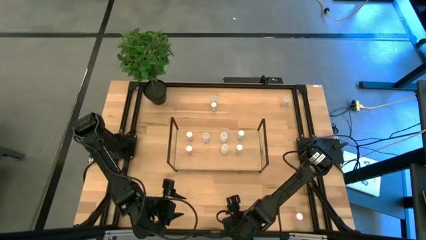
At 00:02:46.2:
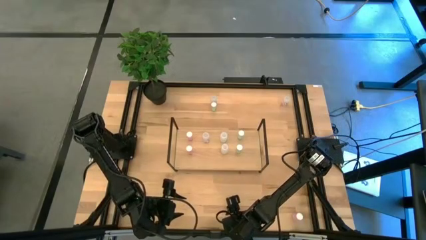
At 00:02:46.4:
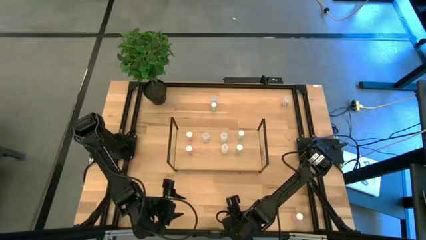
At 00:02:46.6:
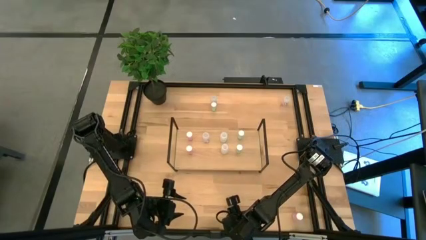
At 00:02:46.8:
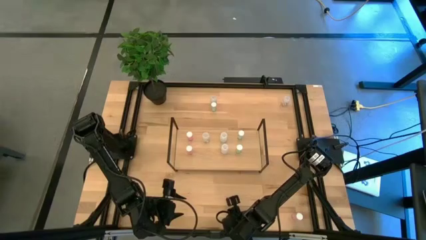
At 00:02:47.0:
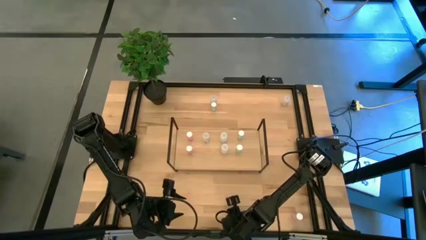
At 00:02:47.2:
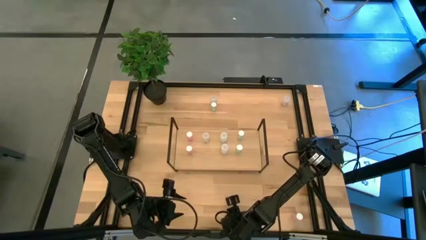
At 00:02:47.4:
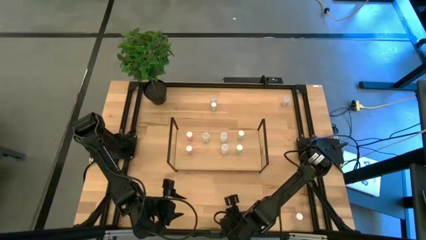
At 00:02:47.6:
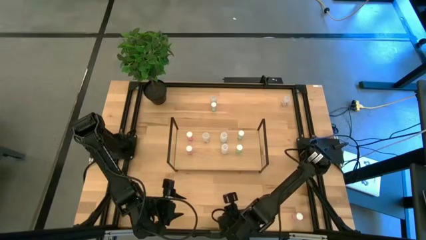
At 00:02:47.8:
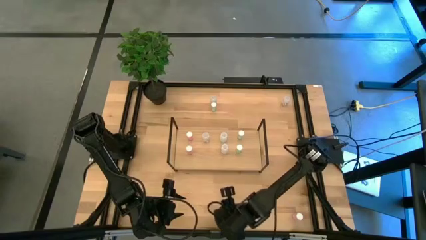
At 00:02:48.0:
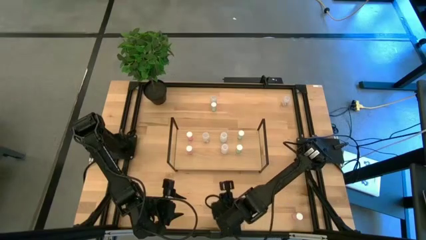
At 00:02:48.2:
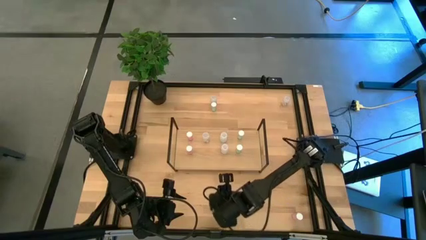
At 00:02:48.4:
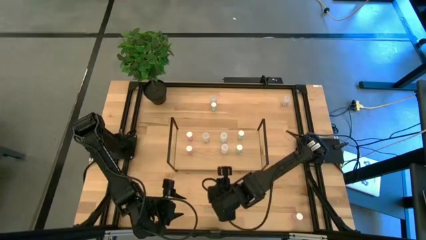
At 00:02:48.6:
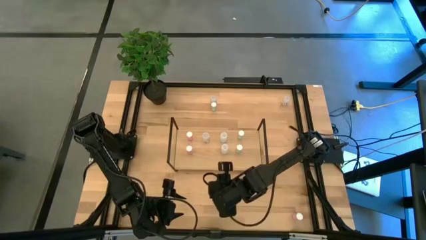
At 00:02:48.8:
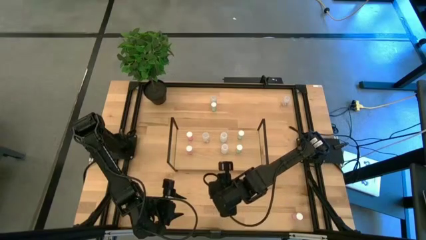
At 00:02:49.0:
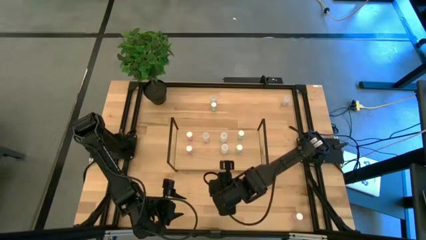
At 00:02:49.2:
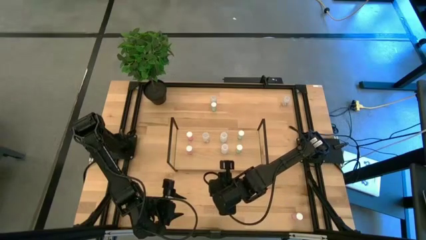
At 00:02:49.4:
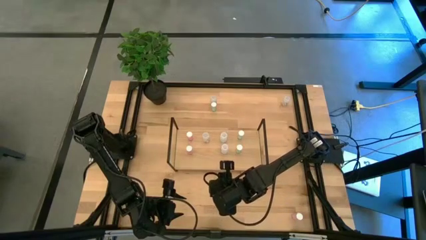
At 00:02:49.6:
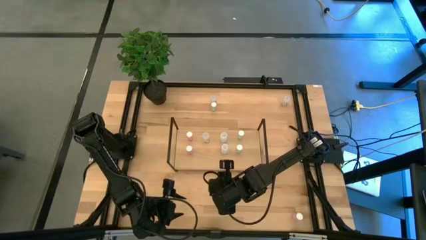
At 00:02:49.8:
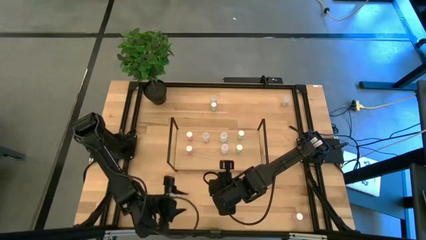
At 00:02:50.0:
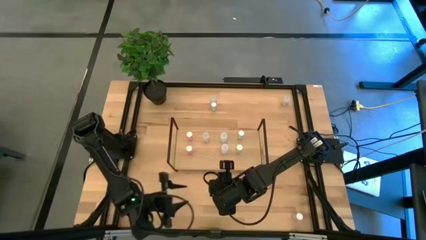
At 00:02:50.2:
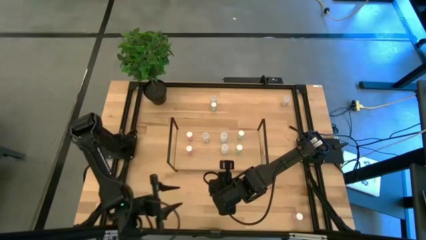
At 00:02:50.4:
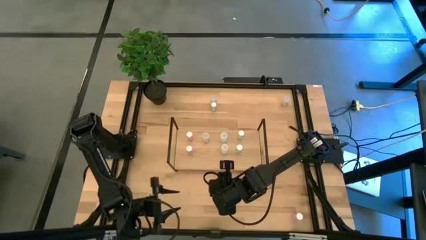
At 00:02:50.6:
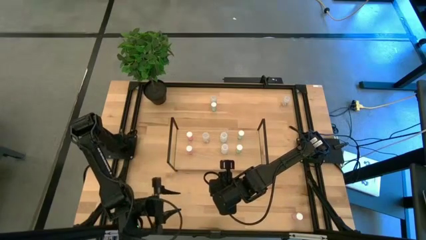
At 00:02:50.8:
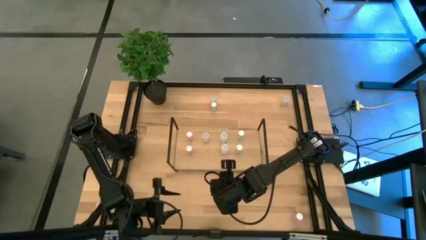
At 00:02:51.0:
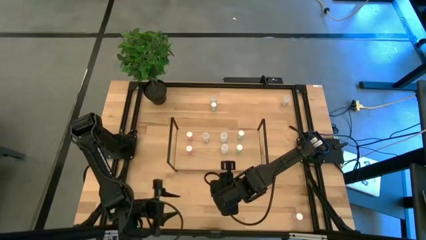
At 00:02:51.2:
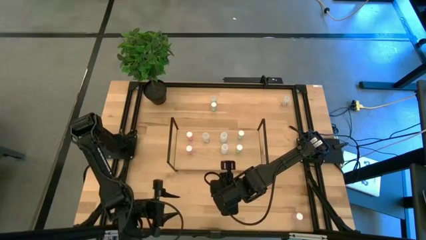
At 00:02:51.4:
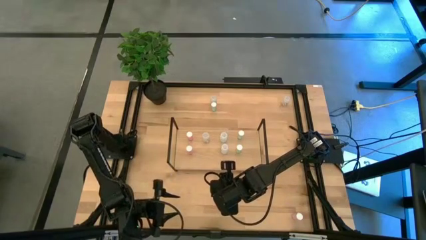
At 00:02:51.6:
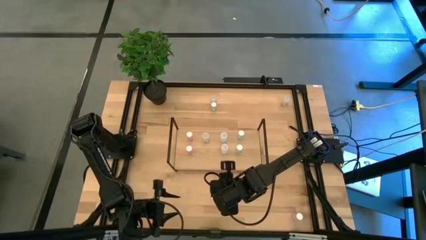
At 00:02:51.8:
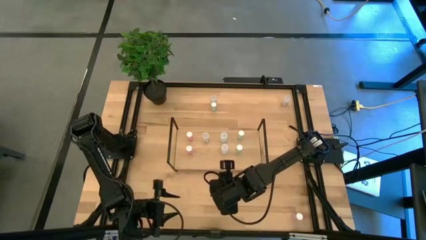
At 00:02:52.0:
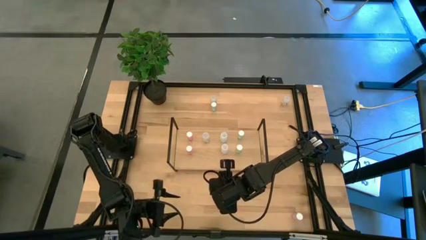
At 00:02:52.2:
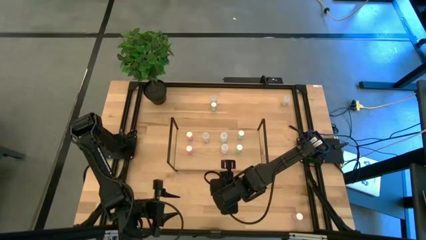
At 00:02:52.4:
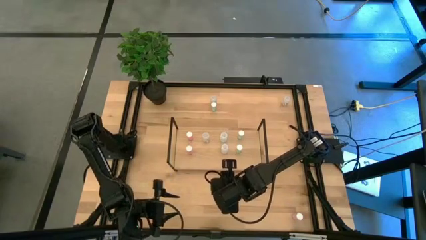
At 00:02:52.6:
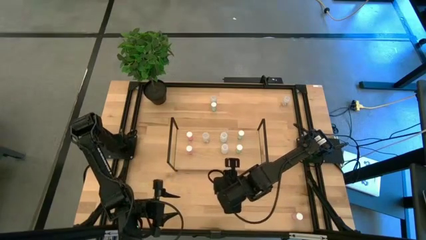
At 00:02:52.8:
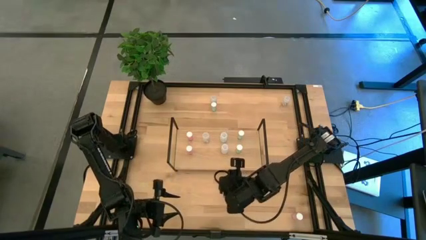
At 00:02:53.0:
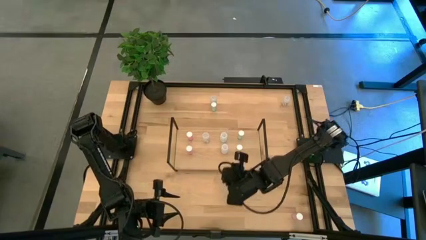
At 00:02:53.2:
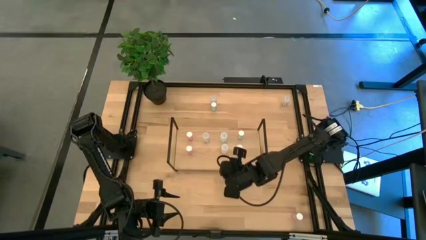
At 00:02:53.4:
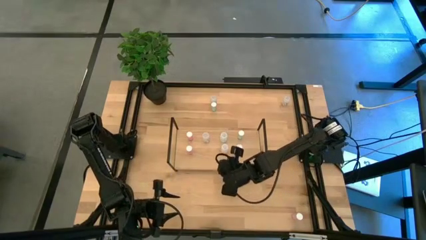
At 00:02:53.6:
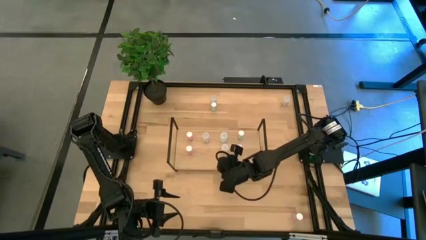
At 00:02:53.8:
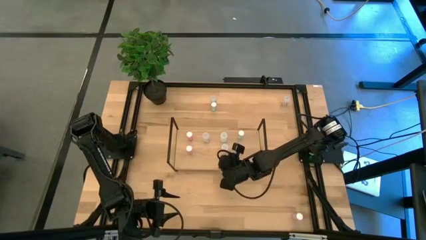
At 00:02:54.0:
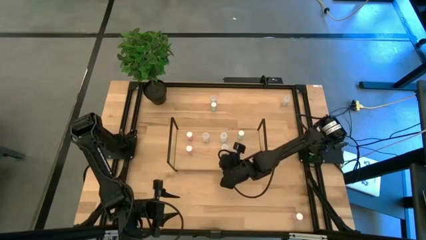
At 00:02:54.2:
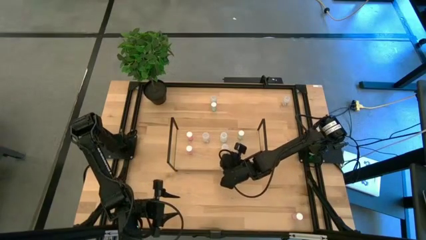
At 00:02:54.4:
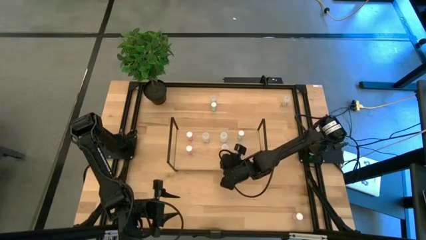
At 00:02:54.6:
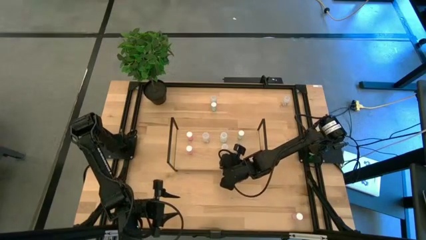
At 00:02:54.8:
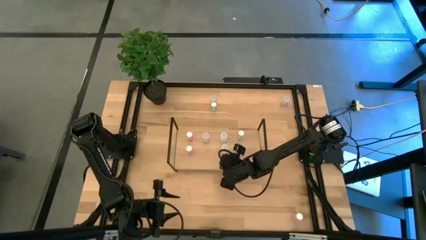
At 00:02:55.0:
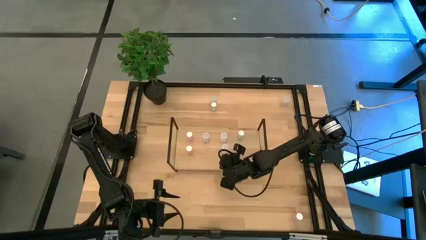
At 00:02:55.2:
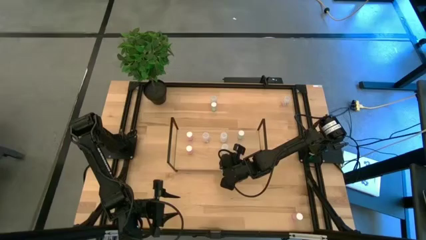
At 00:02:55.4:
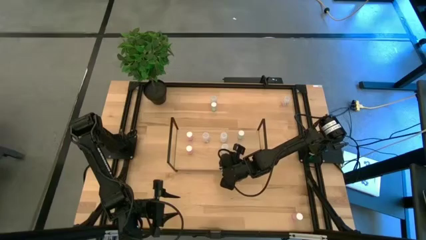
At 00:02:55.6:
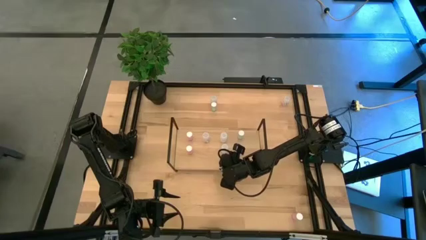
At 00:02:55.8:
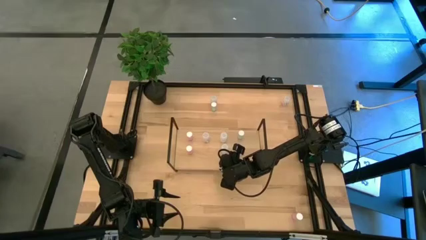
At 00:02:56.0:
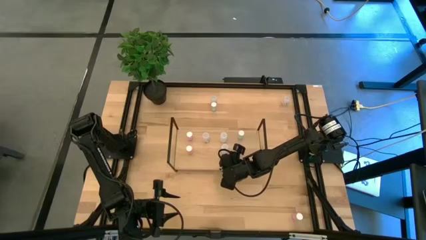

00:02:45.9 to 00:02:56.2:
Task: Pick and place medicine bottles onto shelf by color
Put the white pill bottle on the shelf aligned with the other white pill bottles

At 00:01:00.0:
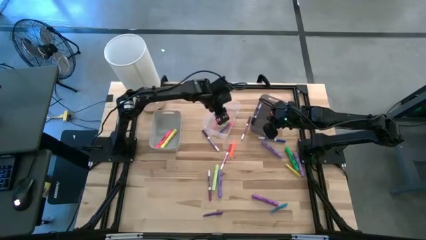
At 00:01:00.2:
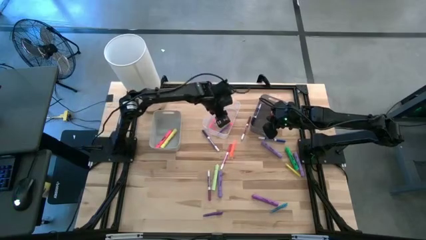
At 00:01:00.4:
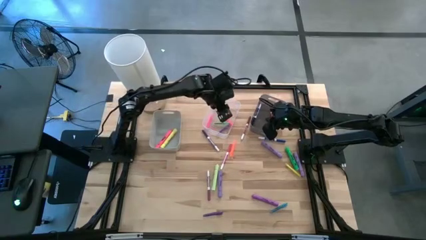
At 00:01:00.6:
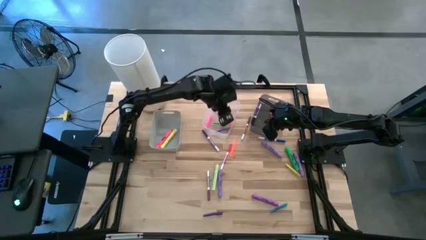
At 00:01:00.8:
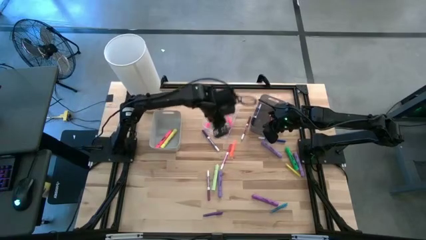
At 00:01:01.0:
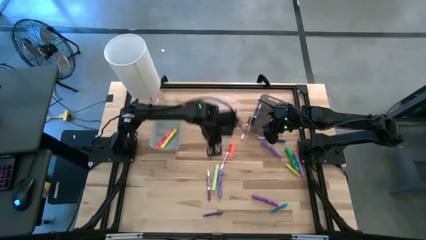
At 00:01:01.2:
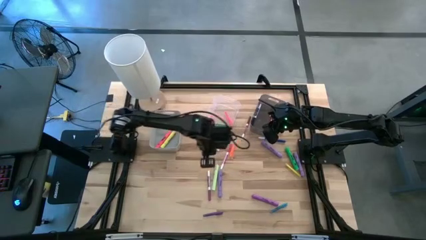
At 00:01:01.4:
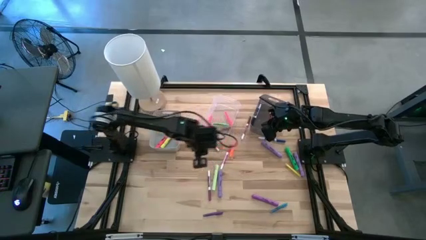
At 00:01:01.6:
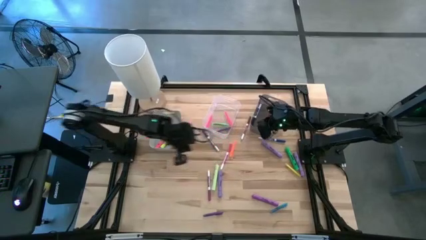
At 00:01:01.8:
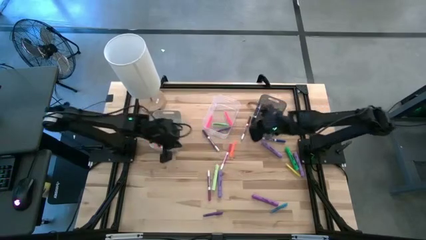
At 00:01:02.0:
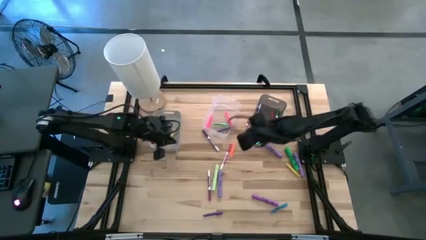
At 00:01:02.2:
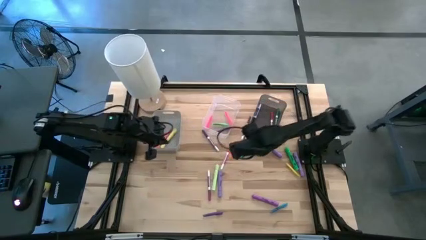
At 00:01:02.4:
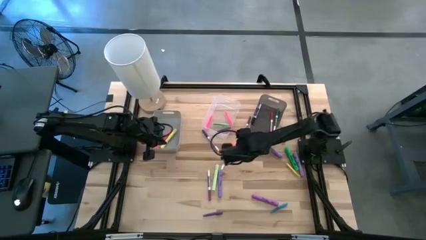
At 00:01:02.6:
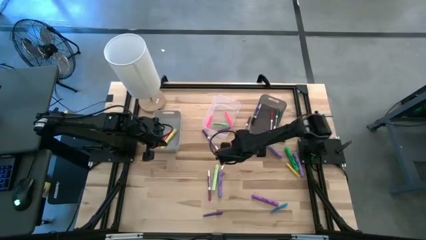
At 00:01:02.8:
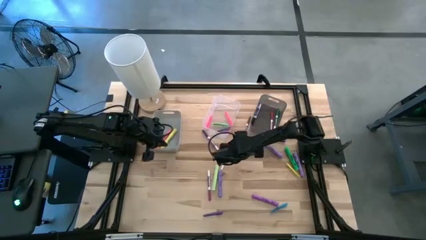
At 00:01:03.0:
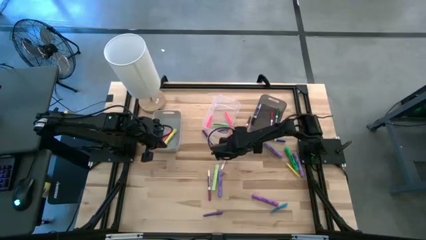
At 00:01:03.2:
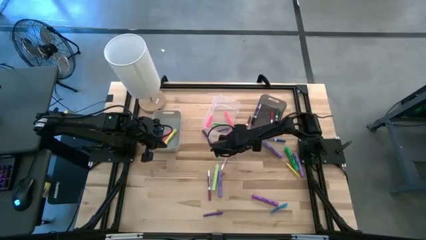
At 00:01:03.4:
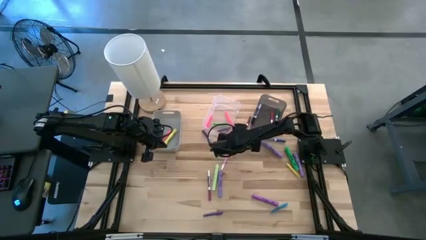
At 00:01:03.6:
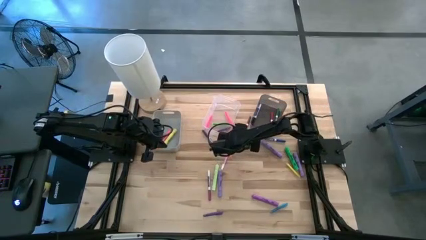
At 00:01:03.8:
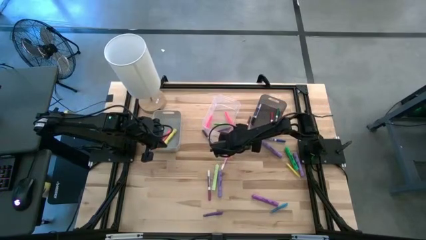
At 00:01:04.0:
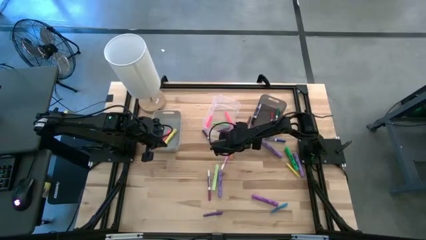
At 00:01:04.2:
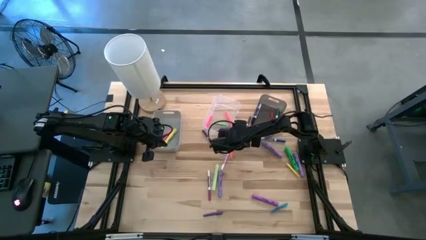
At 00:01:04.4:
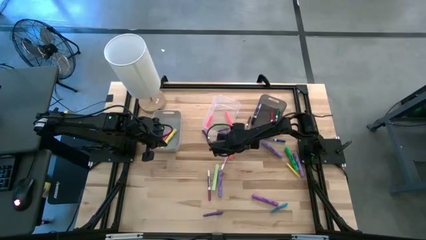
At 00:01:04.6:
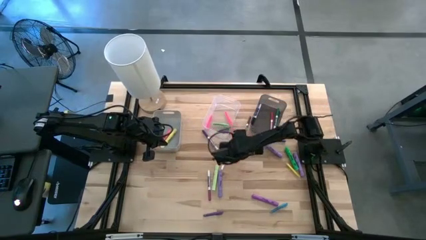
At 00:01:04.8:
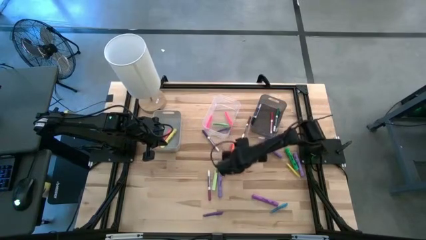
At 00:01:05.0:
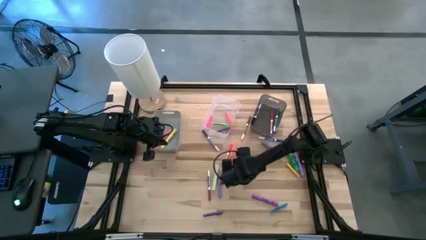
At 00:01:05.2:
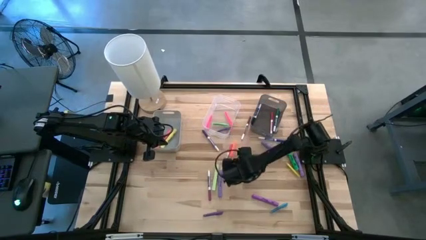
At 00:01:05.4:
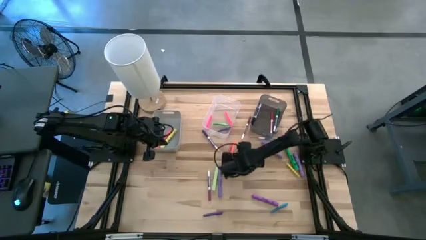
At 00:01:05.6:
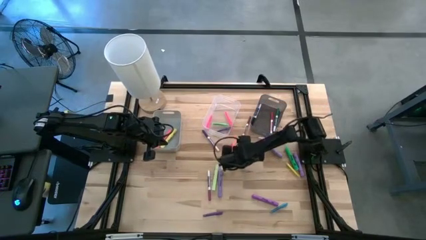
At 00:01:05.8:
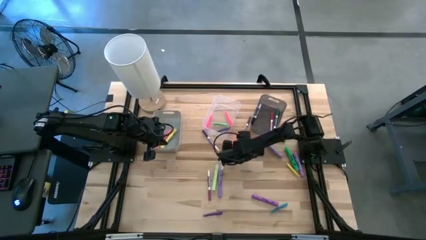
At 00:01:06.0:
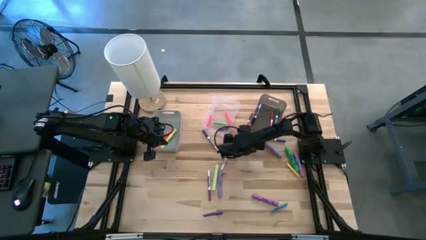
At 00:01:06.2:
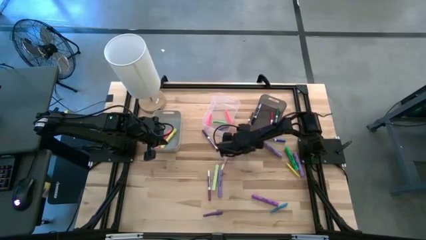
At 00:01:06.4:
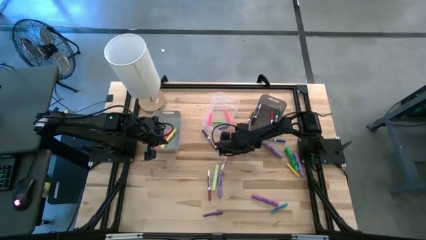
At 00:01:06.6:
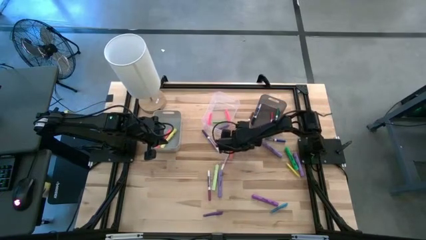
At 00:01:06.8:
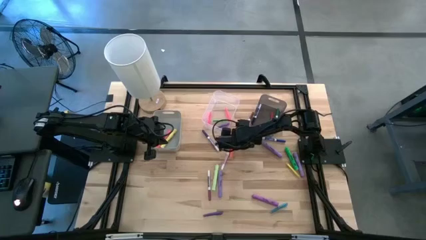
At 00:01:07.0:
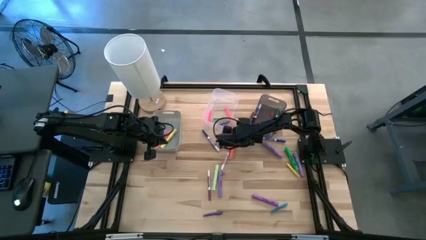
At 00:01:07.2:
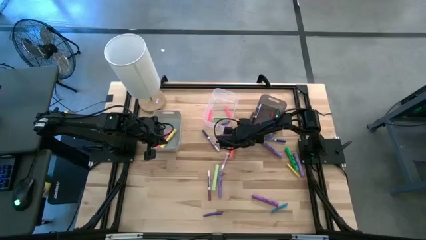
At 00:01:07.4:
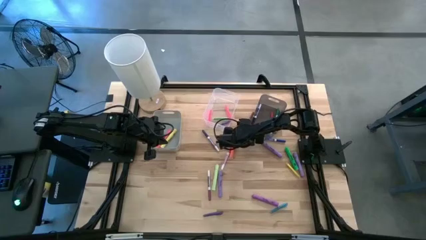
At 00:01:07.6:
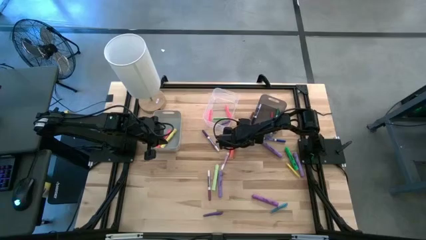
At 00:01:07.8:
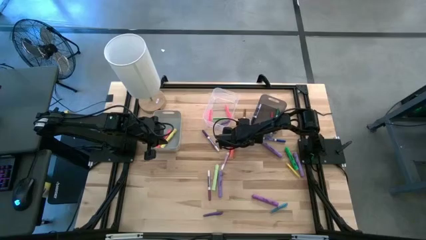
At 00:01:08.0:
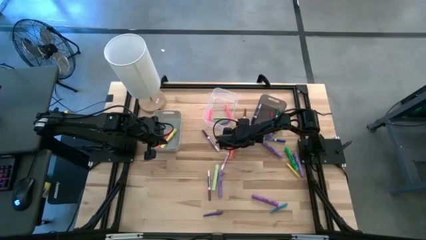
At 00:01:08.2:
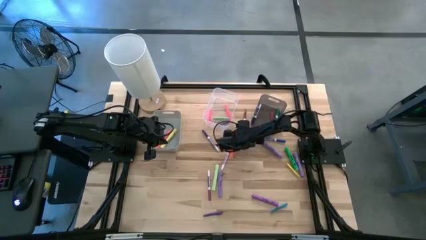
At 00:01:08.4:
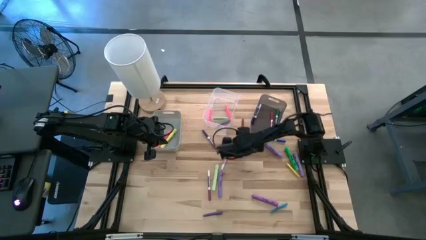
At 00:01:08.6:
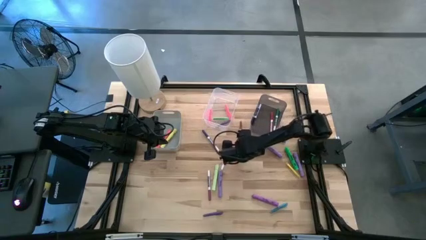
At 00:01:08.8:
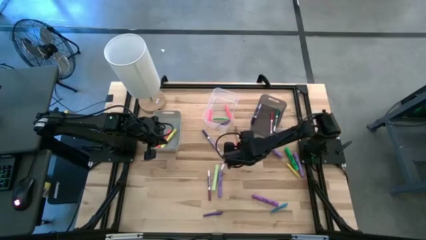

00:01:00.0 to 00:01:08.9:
Task: Pick & Place Markers
Put the brown marker into the black bin
